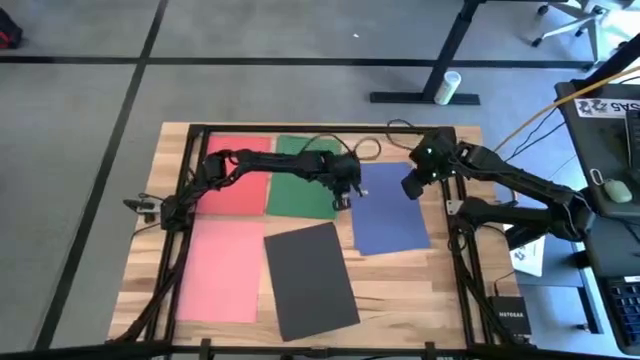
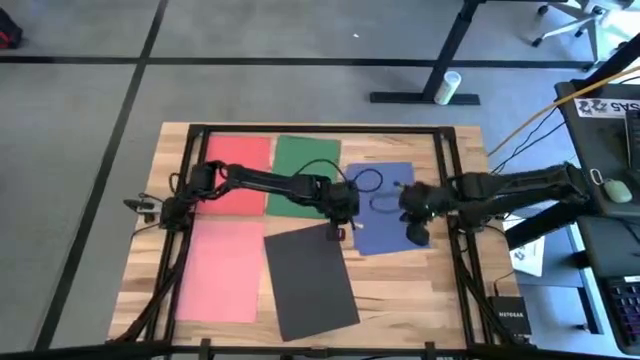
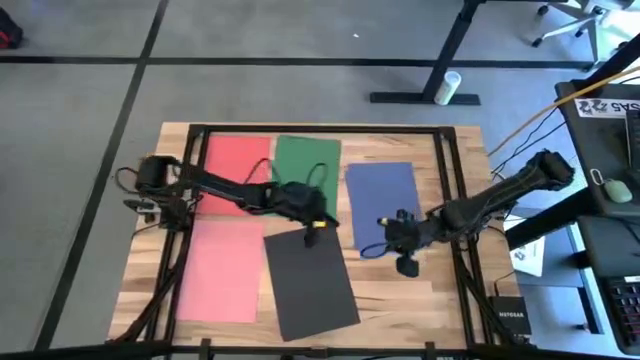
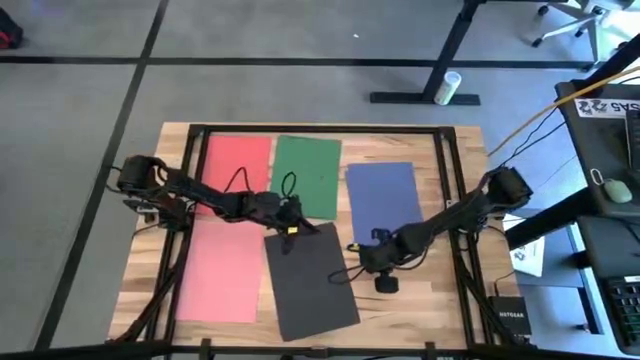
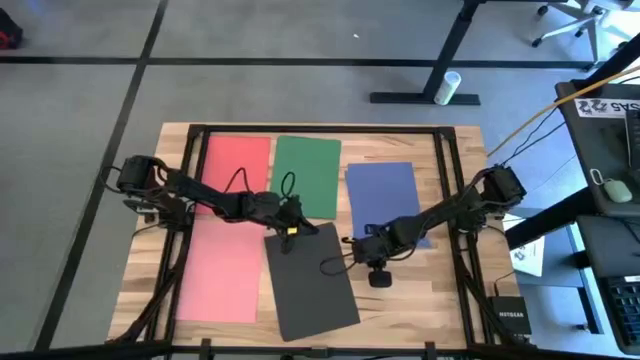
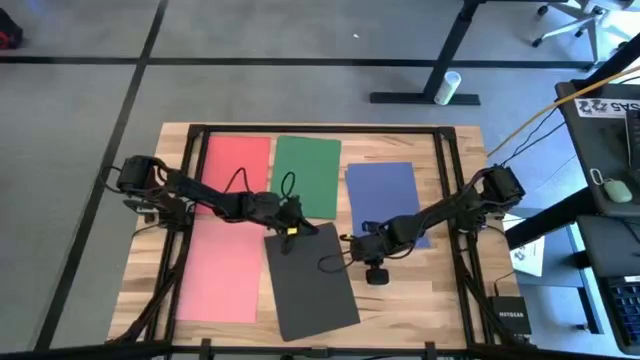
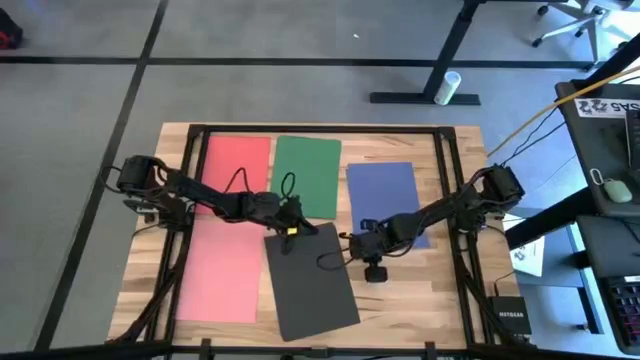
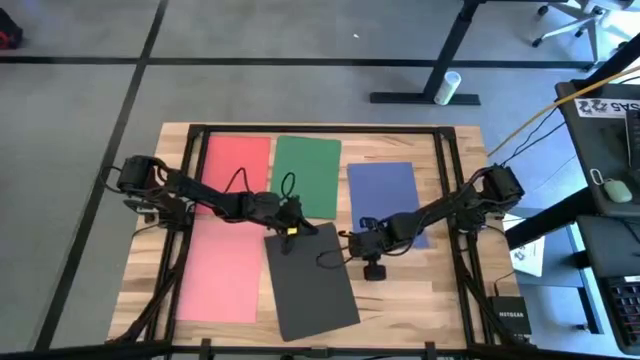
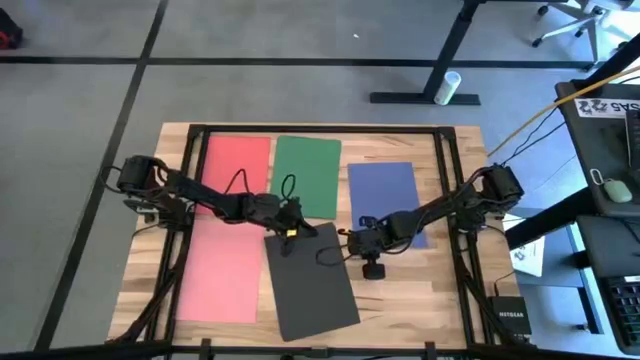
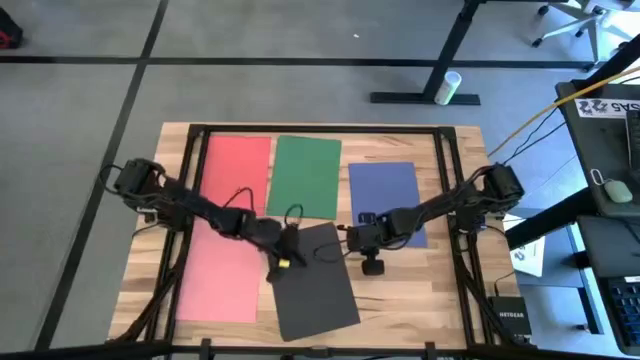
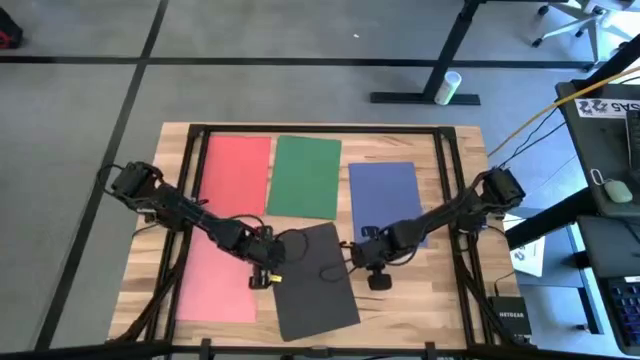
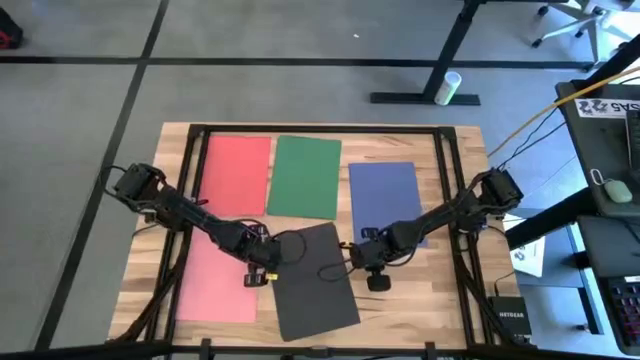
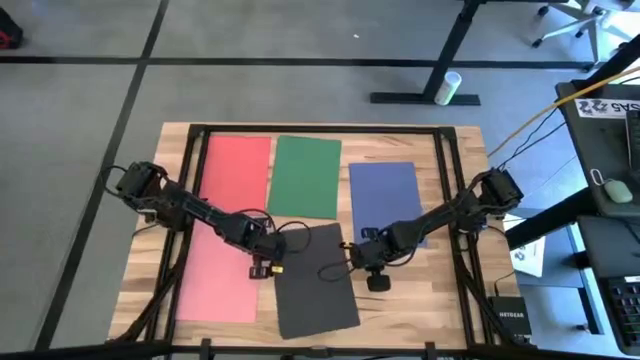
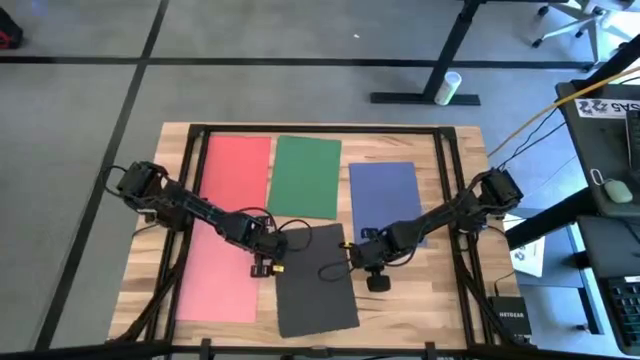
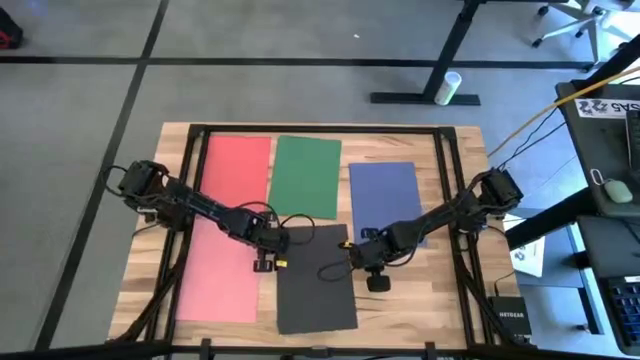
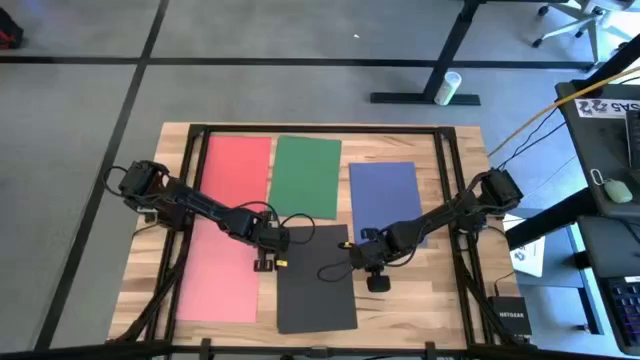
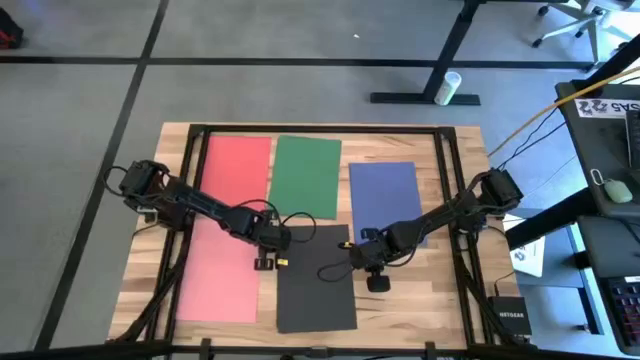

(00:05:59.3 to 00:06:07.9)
Task: Organize paper
Adjust the stacked black papers

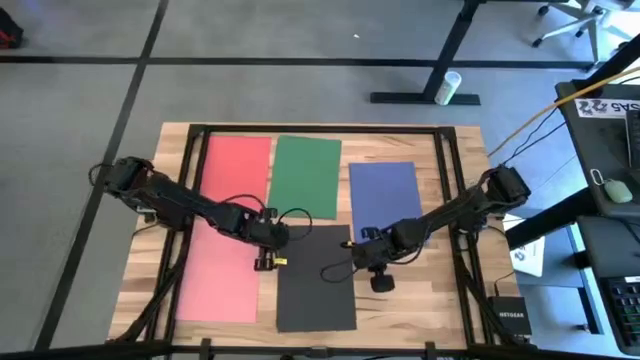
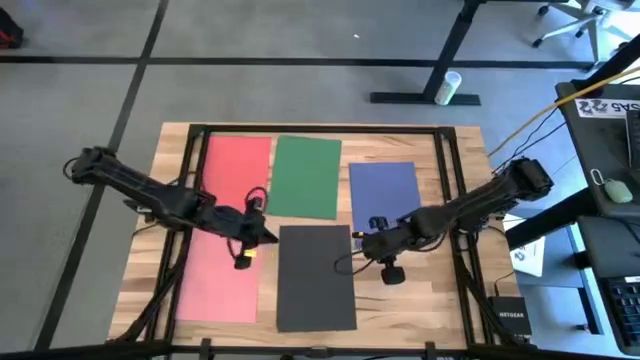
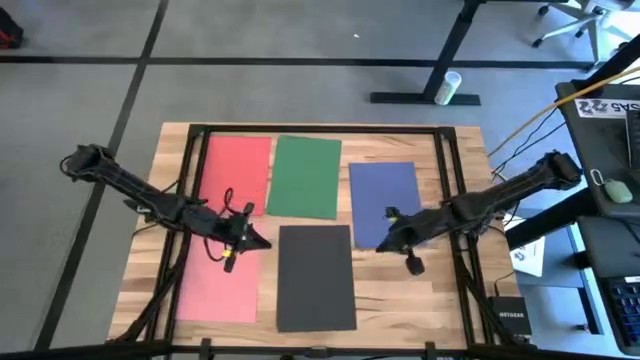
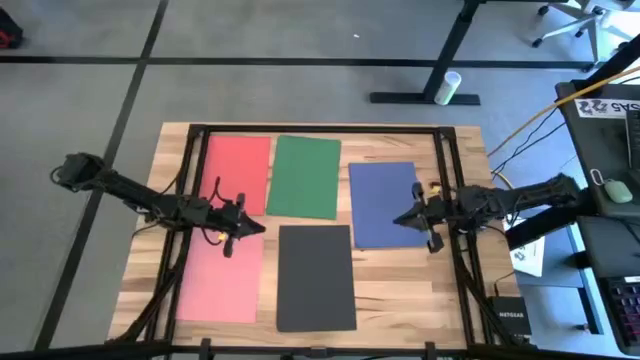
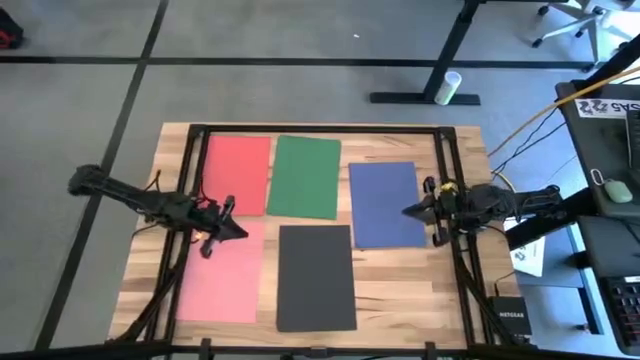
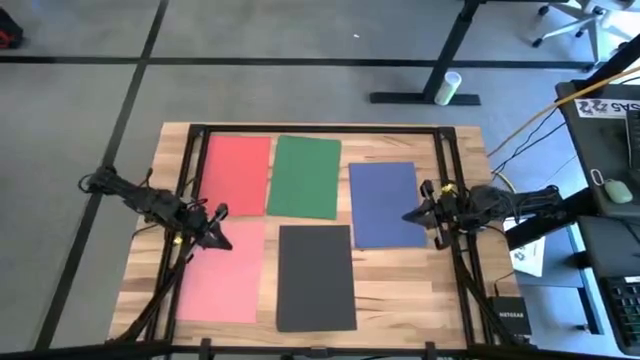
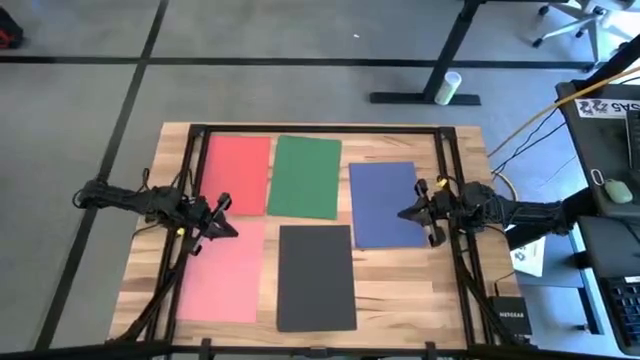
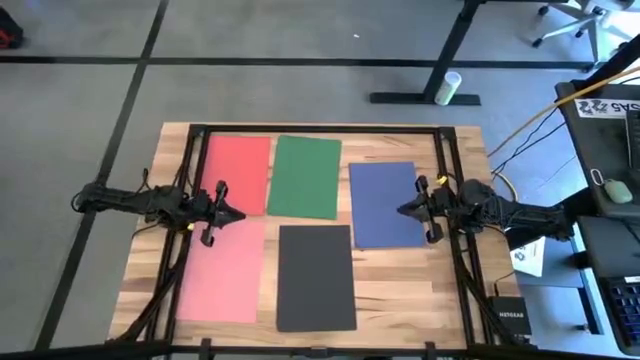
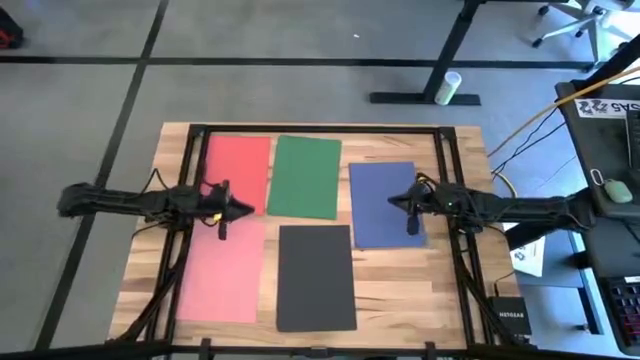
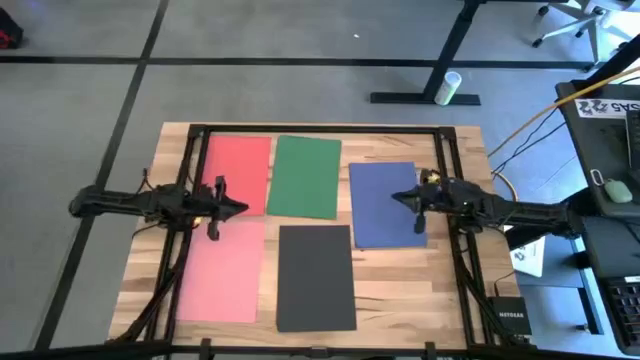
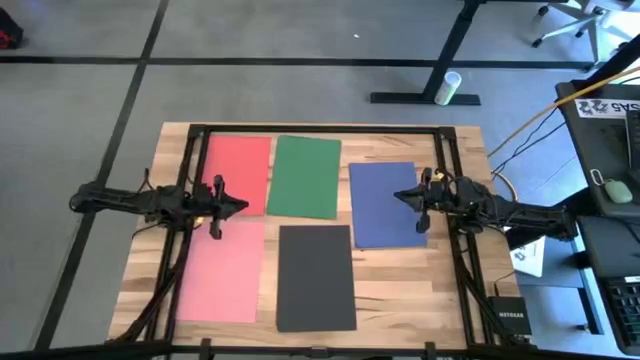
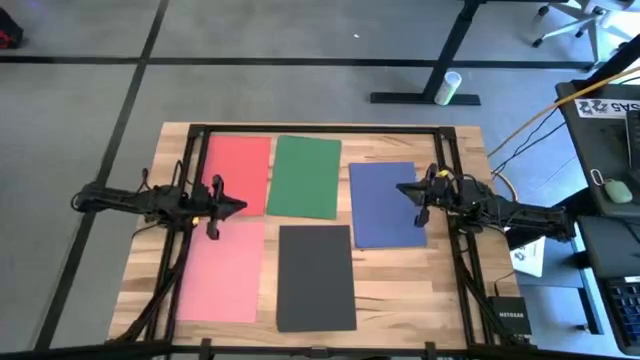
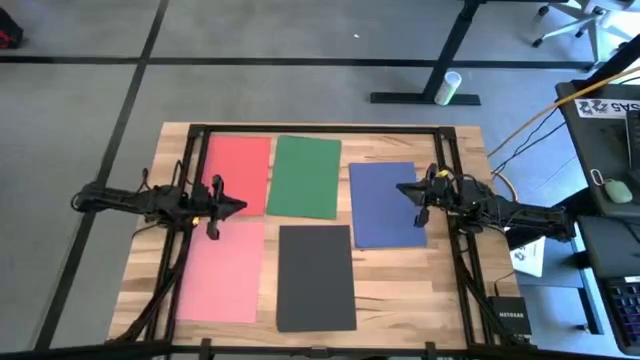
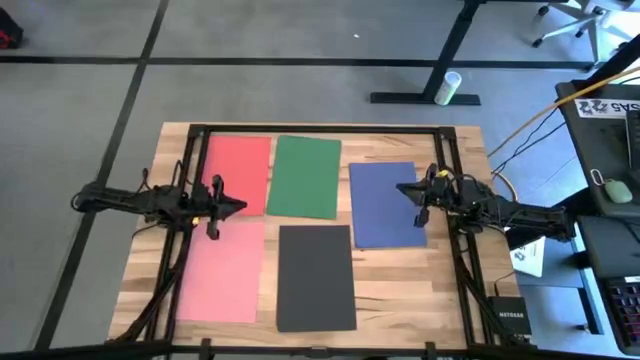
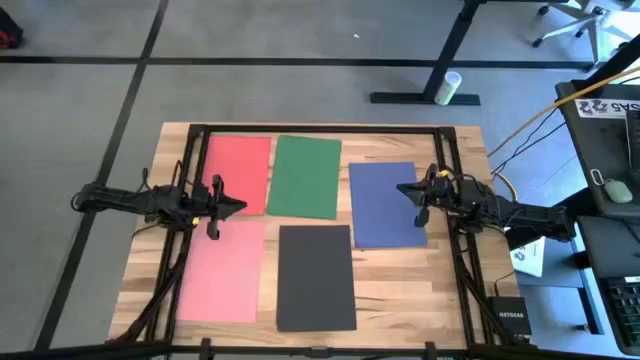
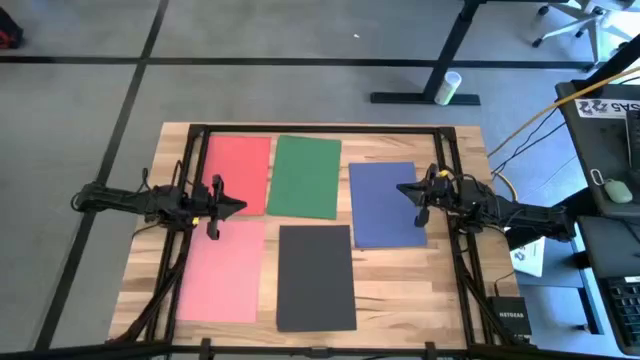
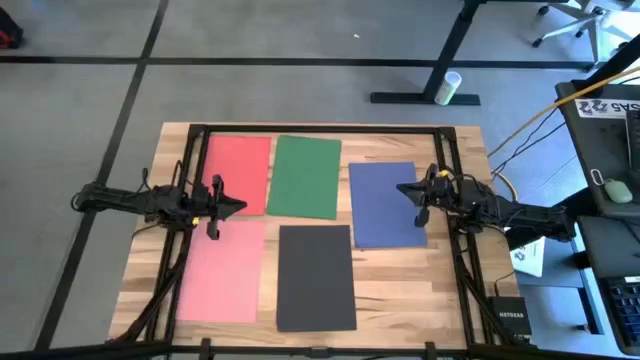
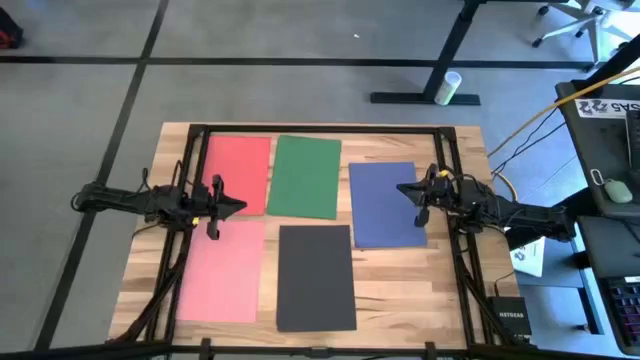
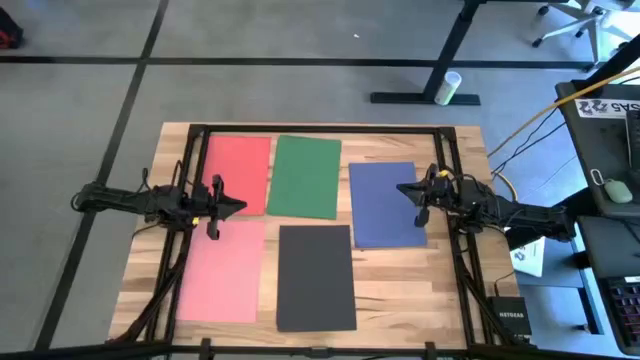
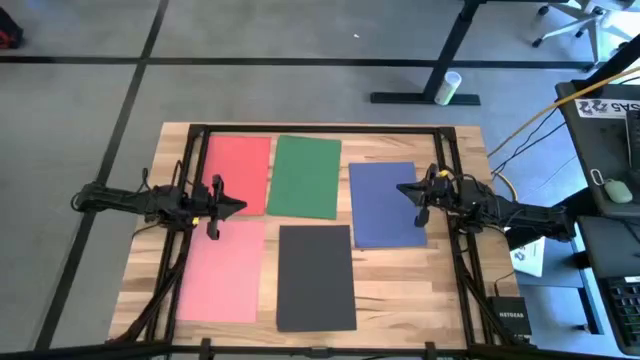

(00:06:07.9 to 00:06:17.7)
Return to Home Position

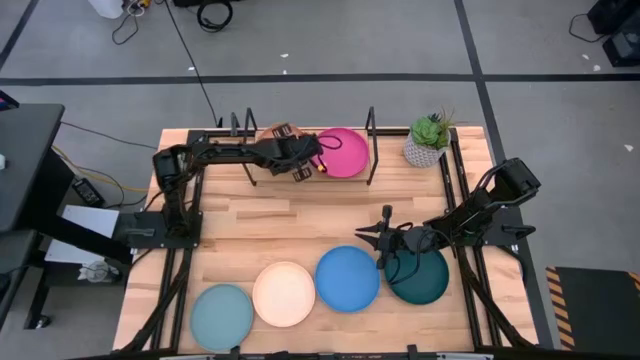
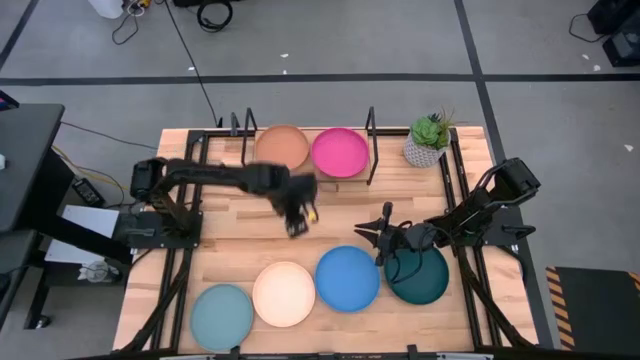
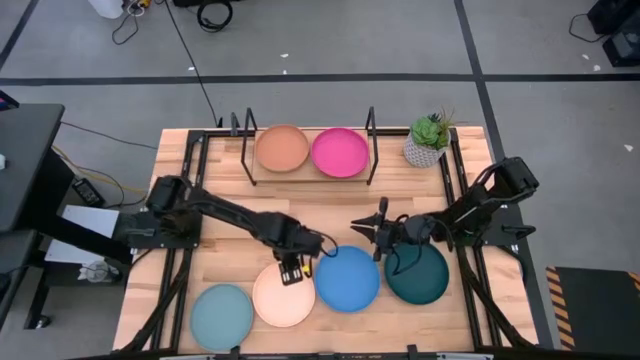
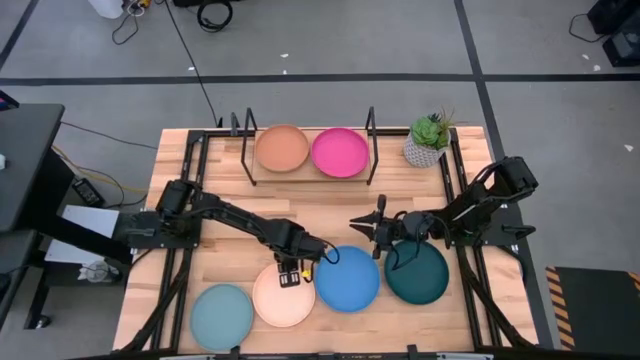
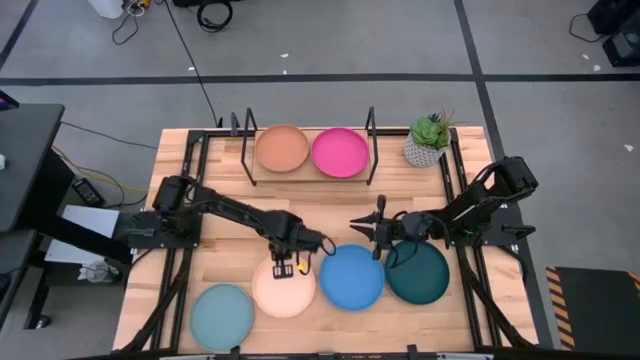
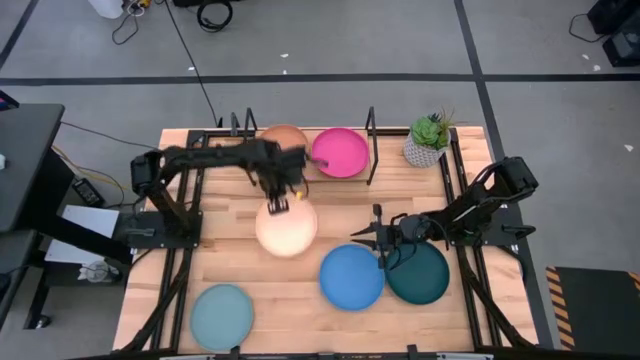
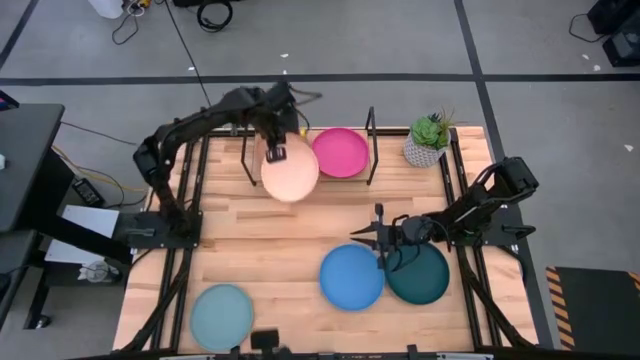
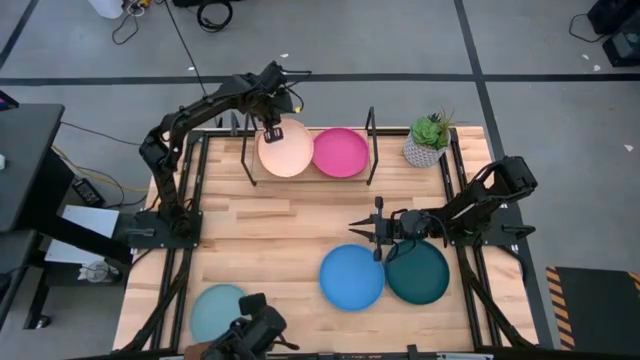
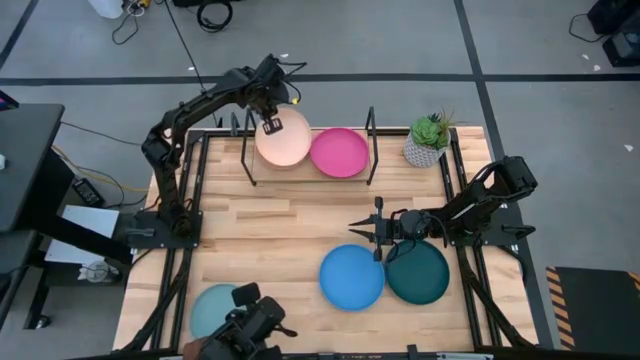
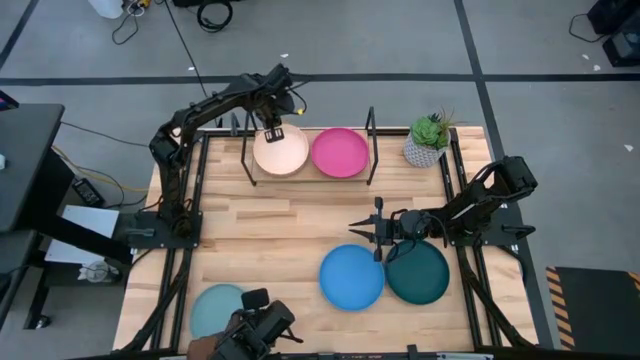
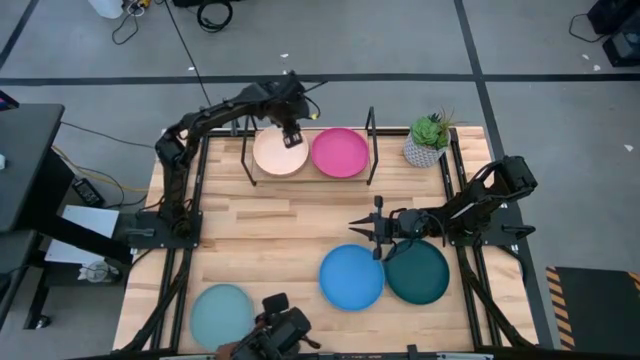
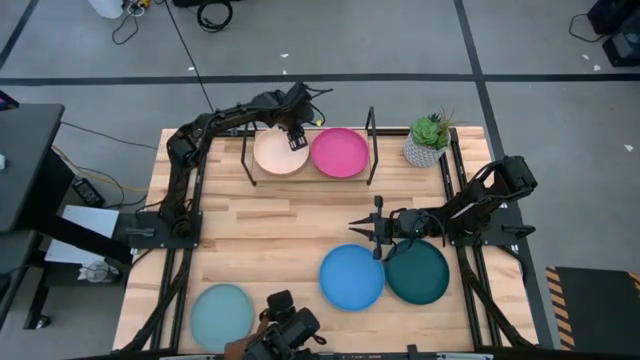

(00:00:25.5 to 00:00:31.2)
Task: Place and stack plates onto a shelf
Stack the white plate on top of the light brown plate
